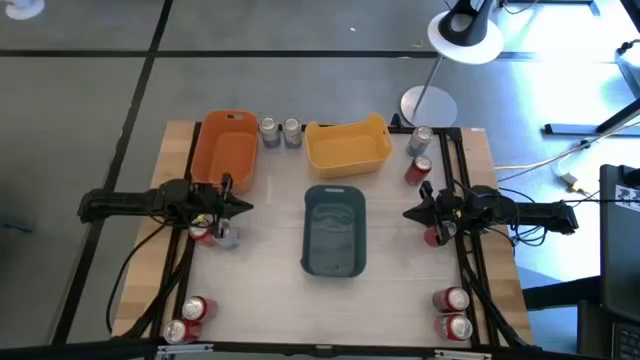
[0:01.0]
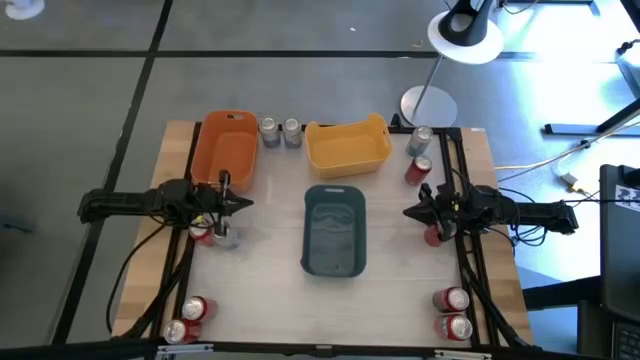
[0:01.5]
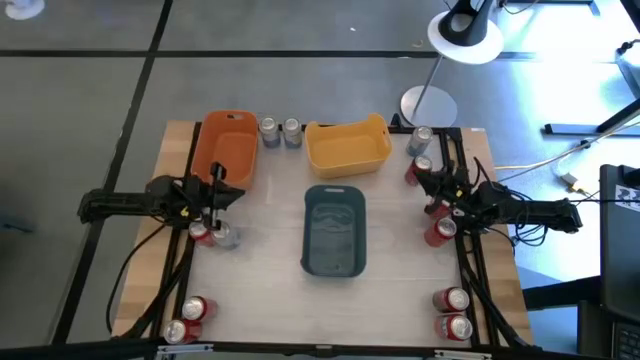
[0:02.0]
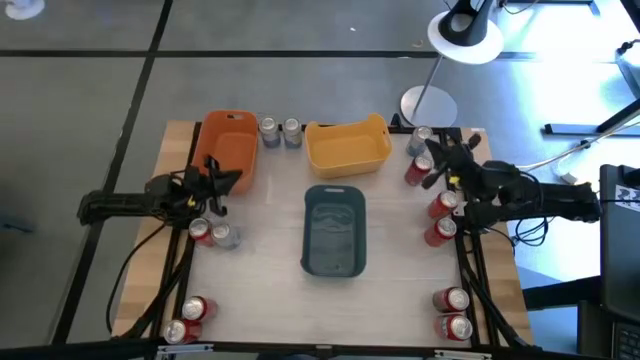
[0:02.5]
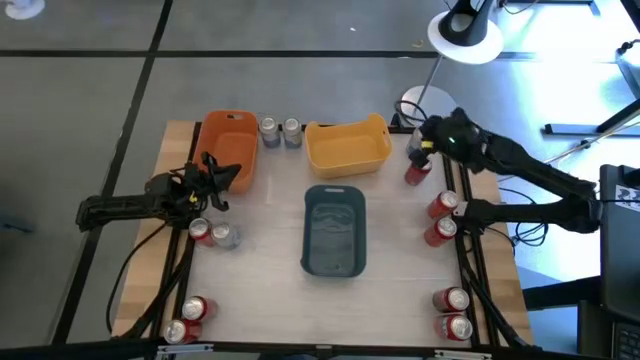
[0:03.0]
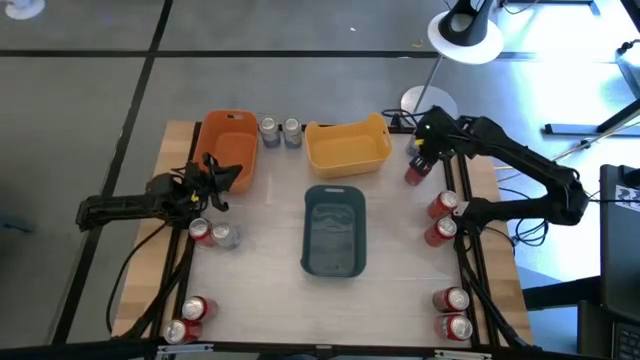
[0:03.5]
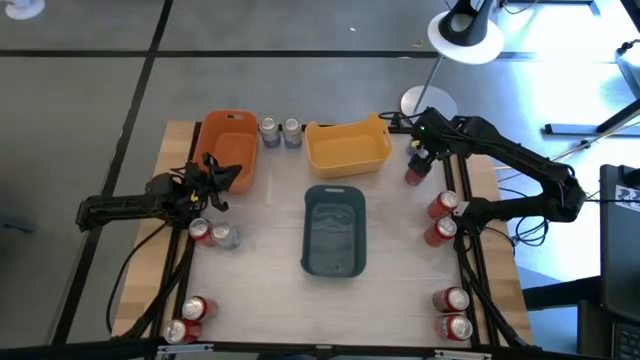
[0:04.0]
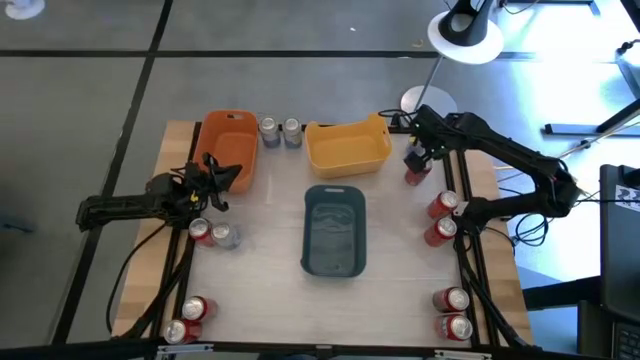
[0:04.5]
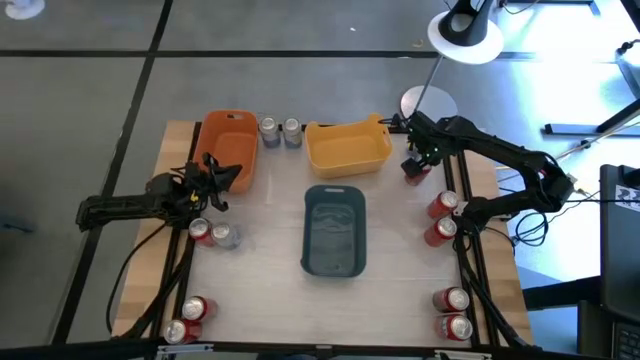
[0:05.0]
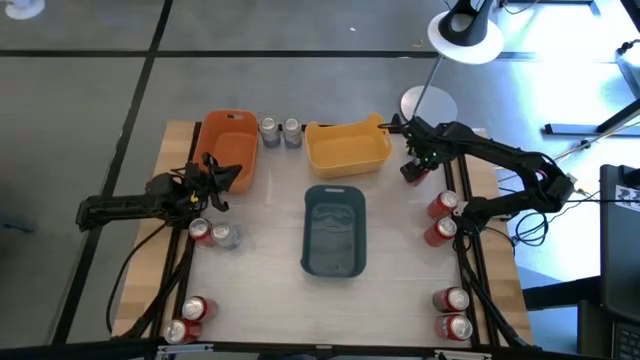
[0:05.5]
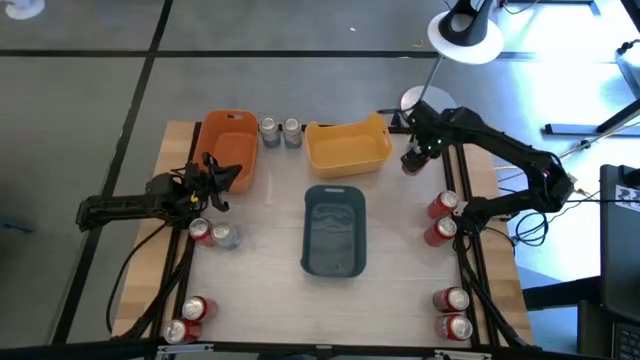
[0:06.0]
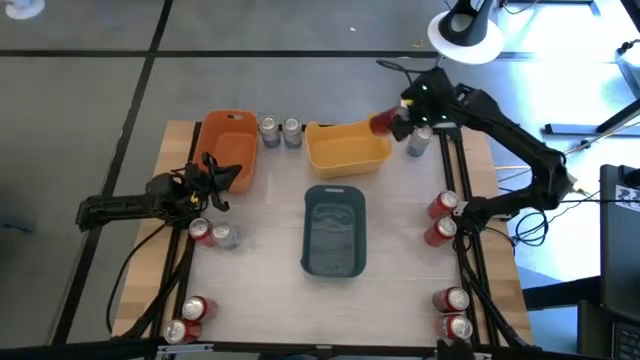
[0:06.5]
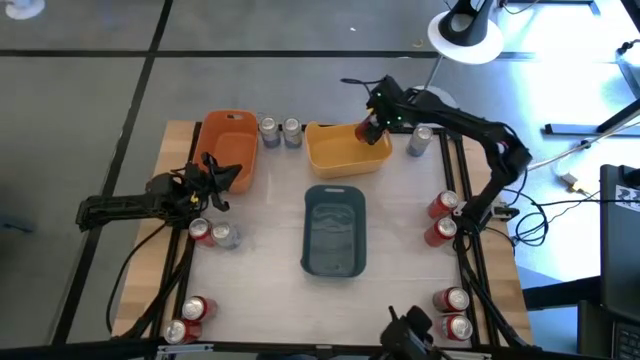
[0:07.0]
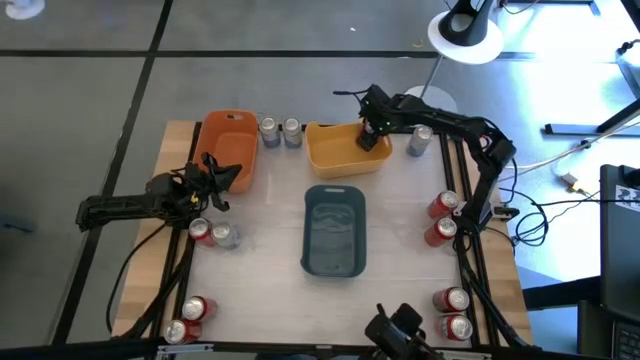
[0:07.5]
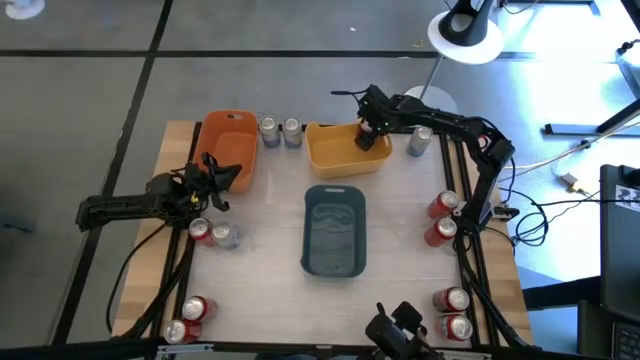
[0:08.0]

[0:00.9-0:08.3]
Task: Sort soda cans
Put the top red soda can into the yellow bin

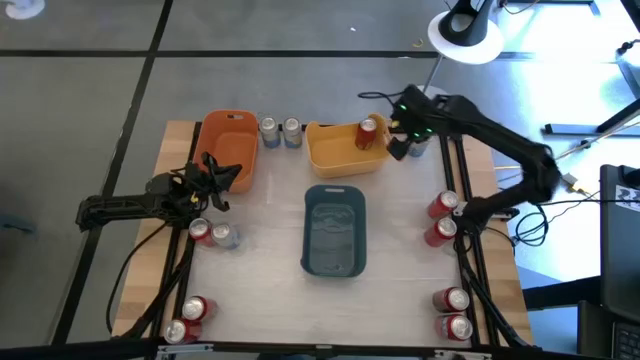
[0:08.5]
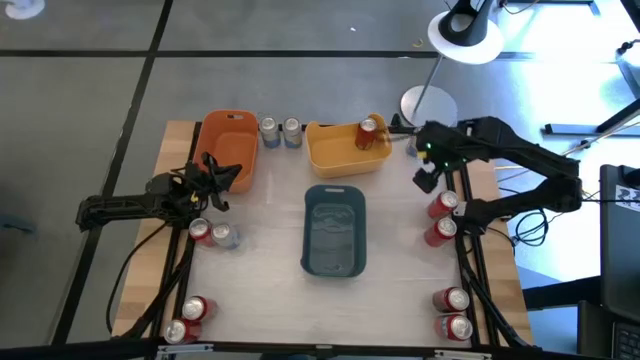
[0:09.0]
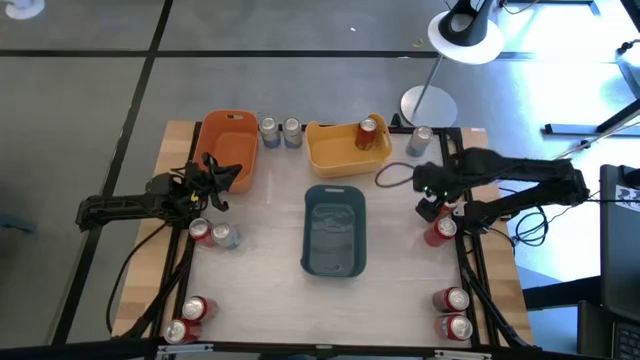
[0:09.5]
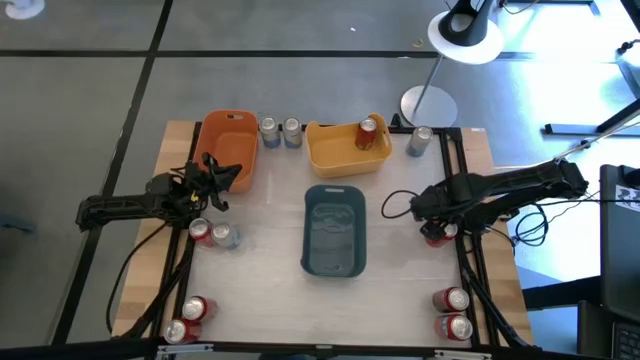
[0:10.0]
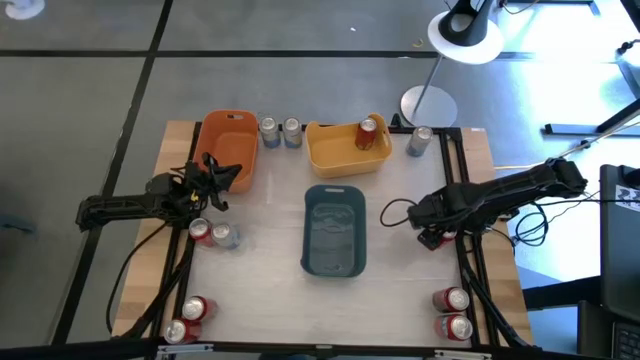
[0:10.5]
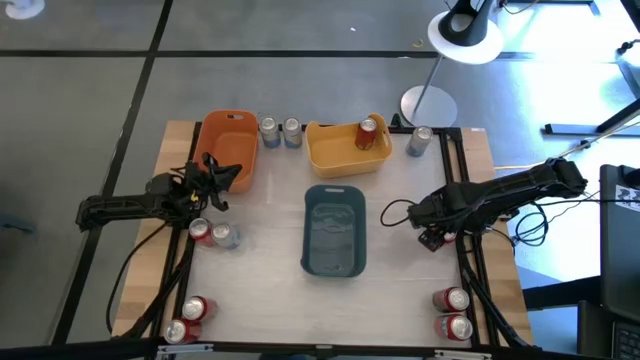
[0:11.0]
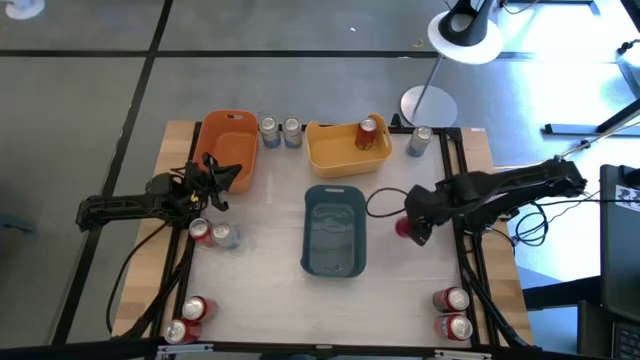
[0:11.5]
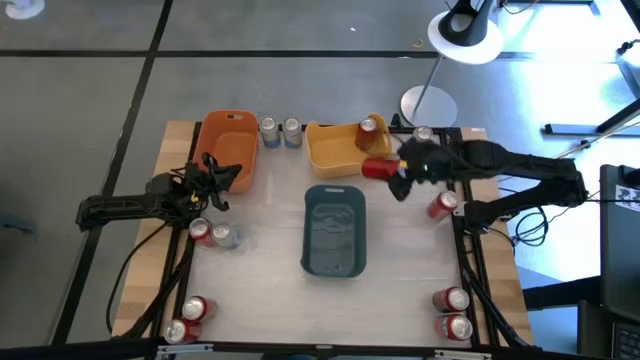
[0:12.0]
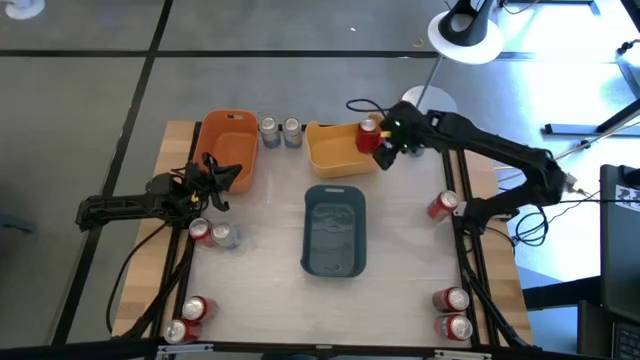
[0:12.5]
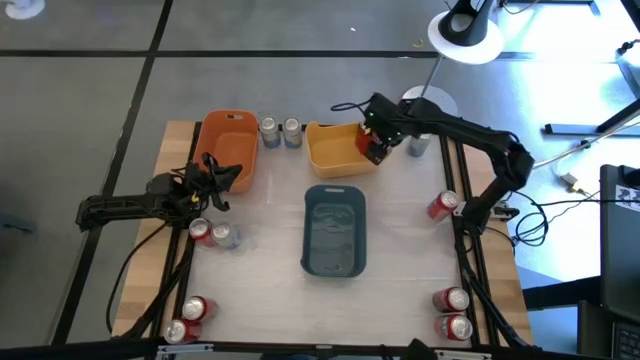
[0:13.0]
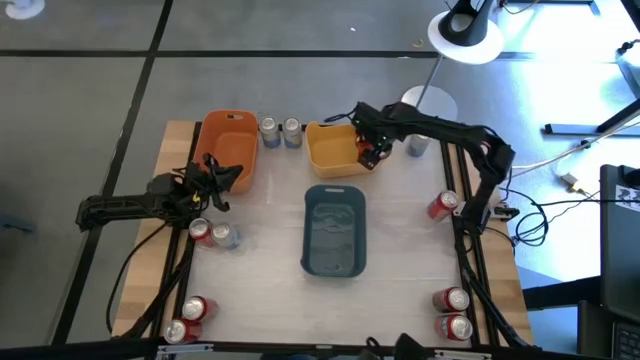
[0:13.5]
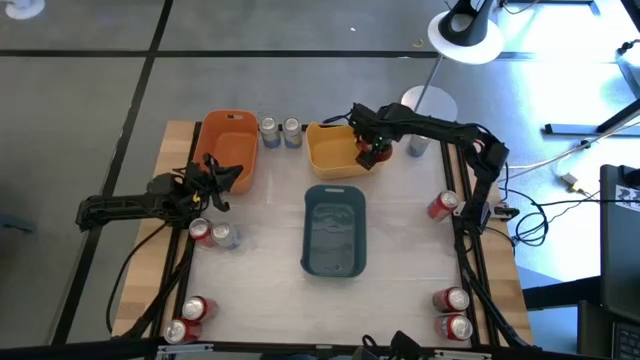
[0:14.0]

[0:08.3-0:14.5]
Put the top red soda can into the yellow bin

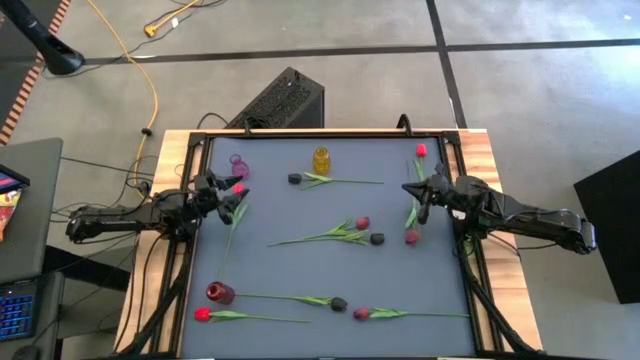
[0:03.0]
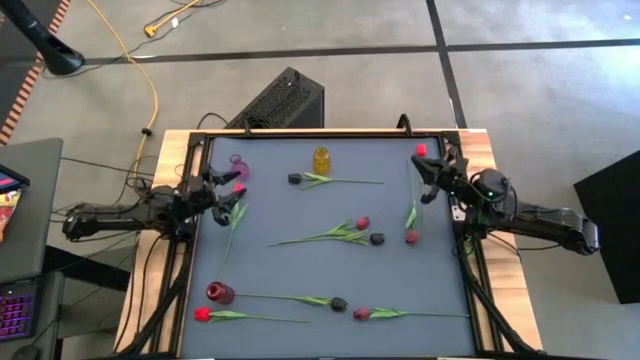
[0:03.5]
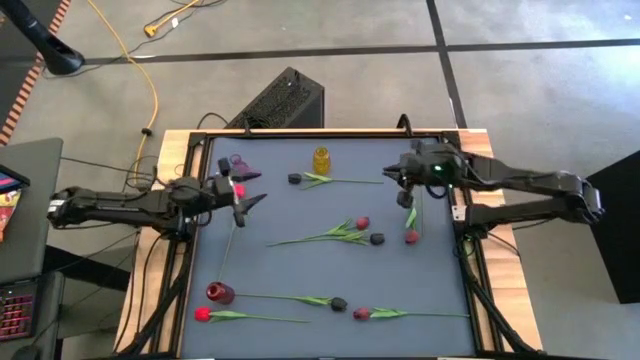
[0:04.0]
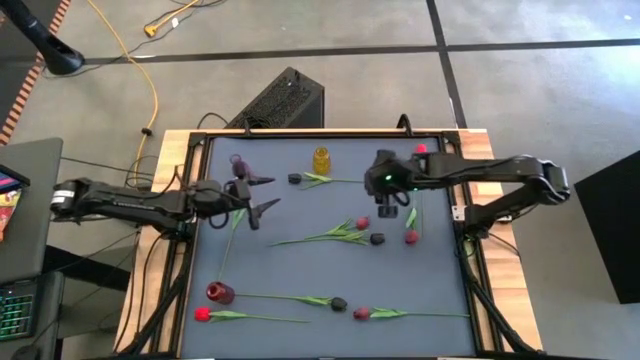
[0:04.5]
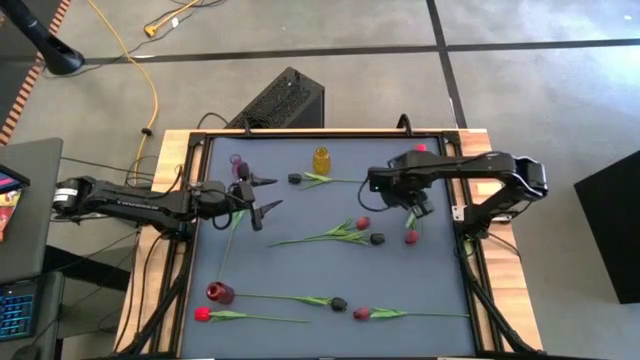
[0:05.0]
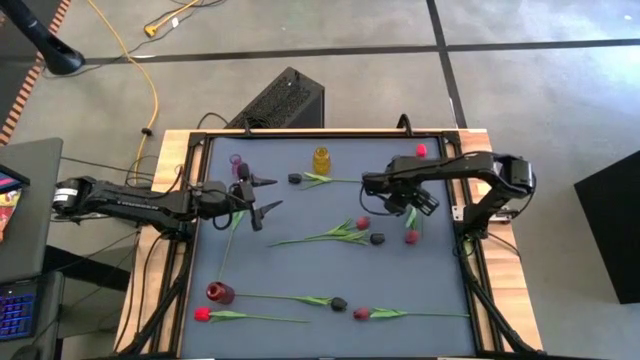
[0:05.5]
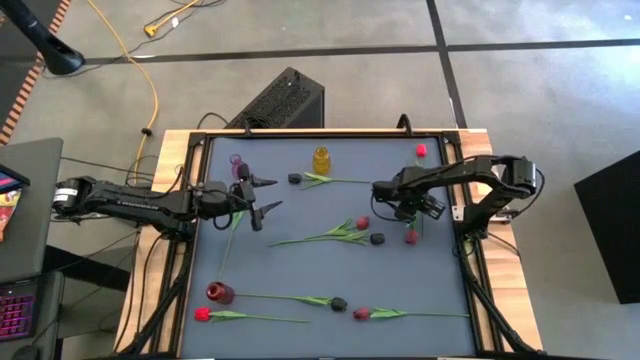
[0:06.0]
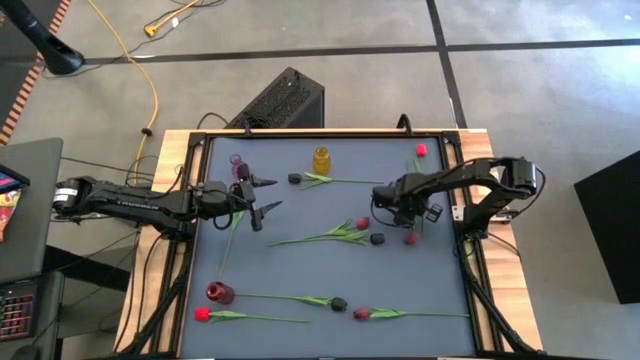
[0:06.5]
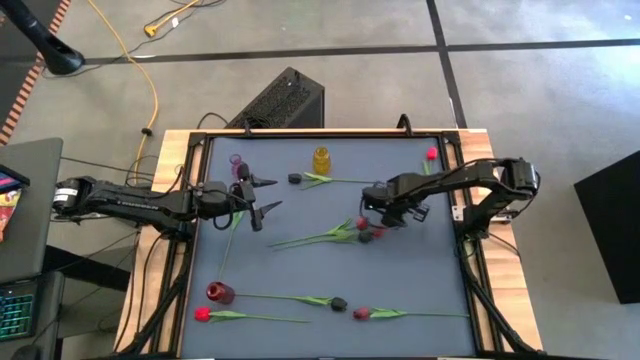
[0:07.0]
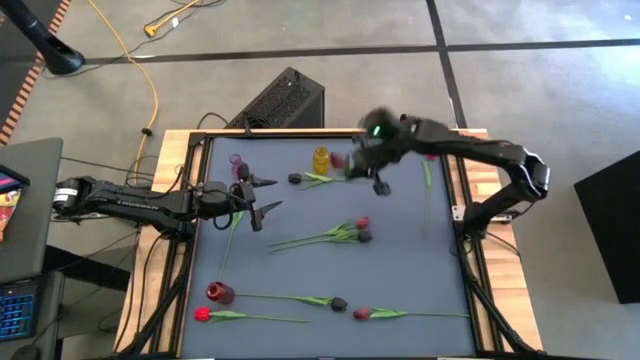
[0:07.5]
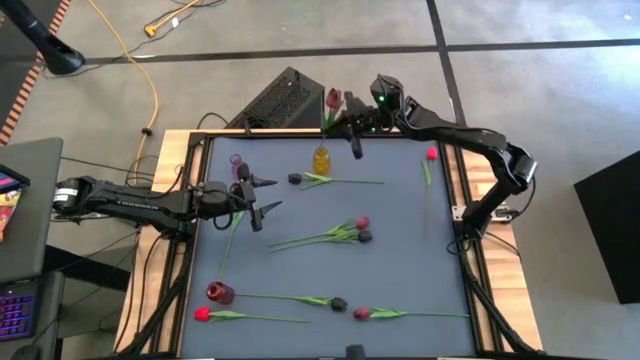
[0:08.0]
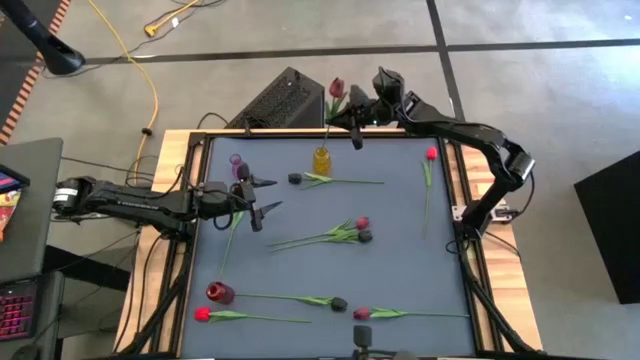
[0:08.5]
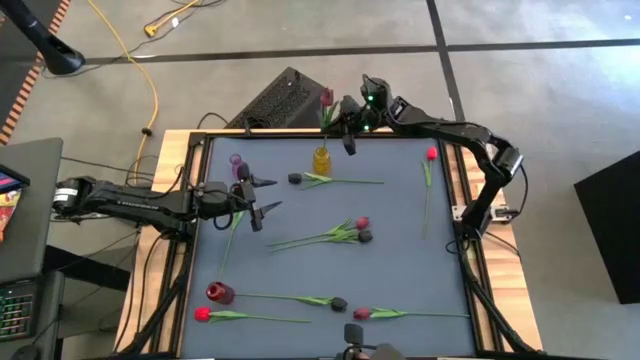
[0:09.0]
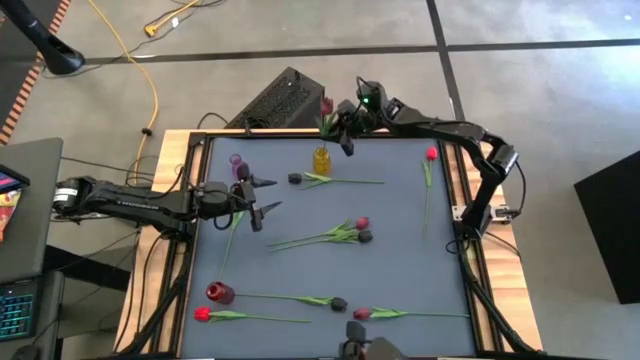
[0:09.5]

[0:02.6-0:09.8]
Task: Sort flowers into vase by color
Put the top right dark red flower into the yellow vase
